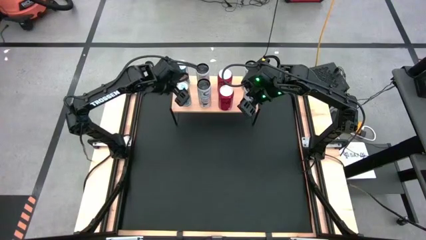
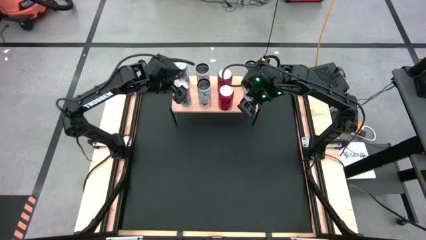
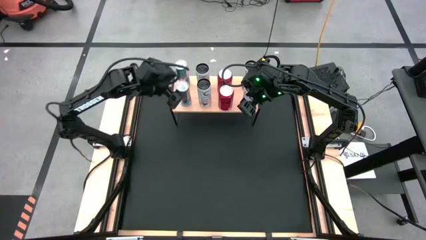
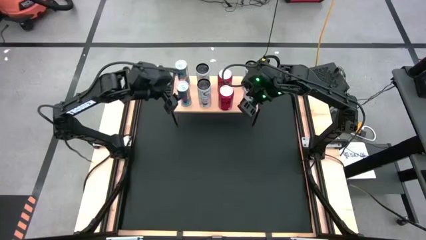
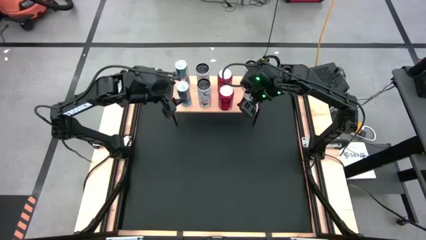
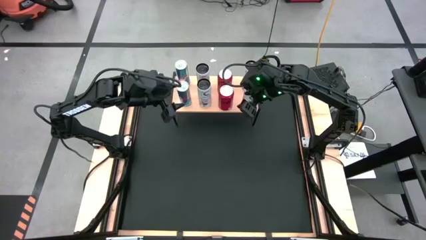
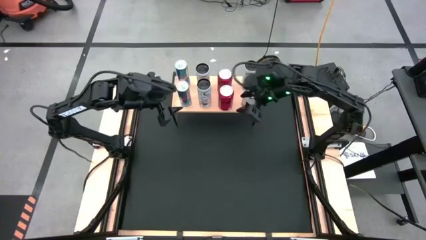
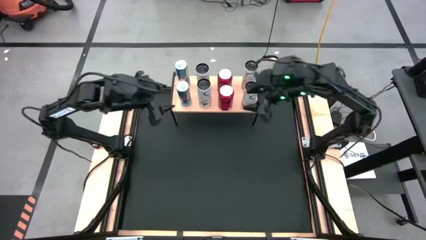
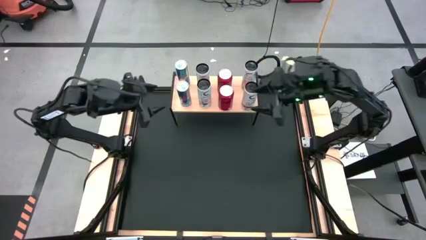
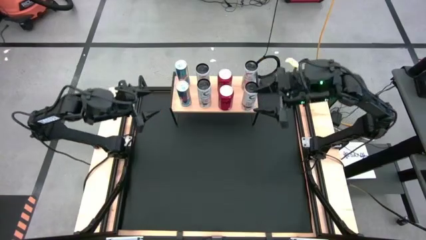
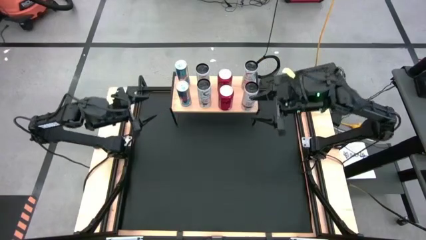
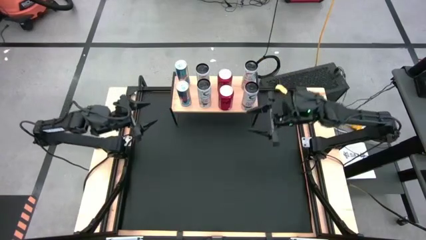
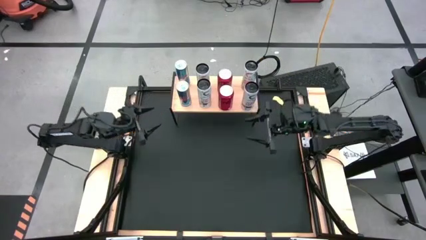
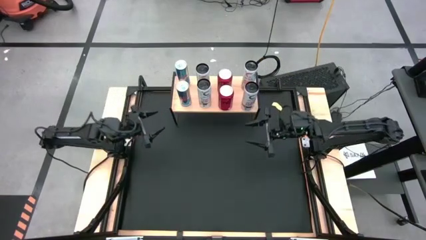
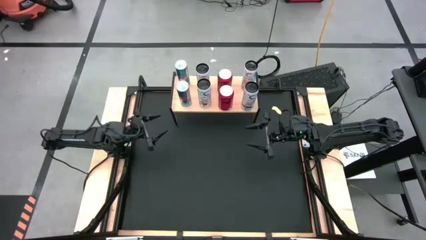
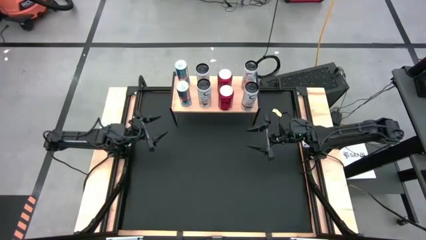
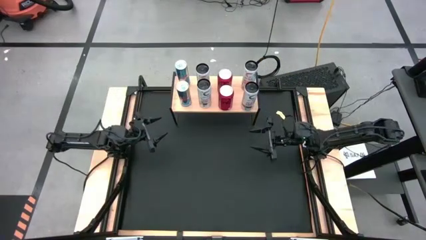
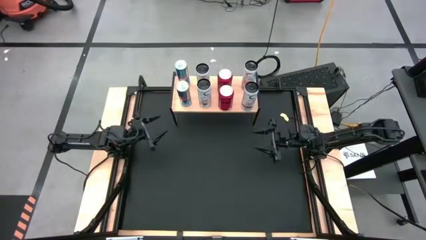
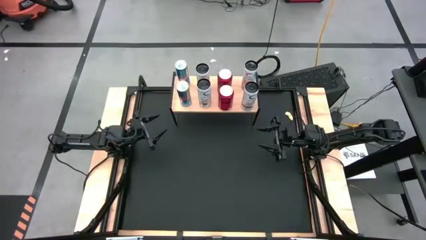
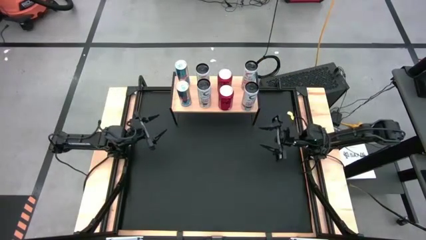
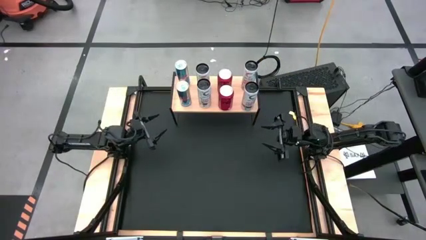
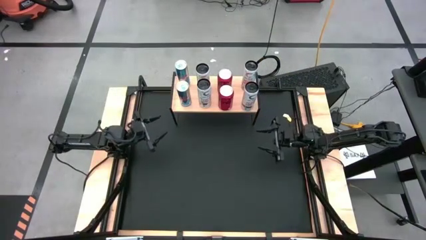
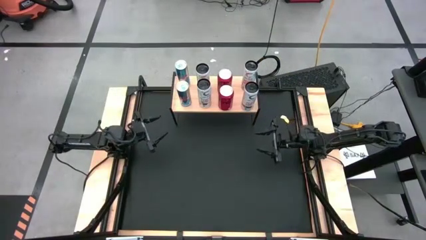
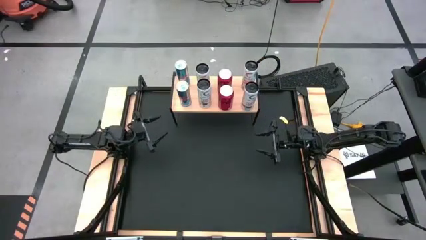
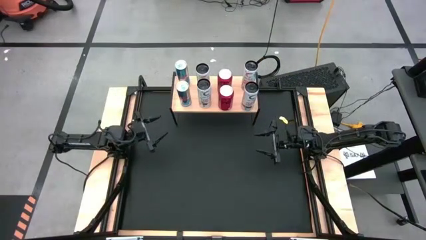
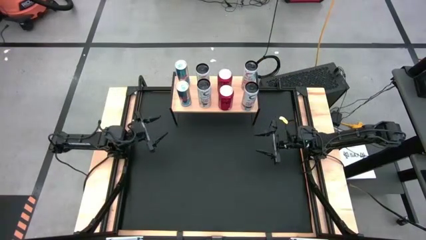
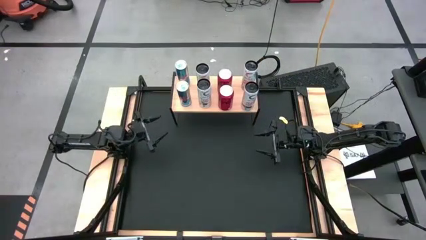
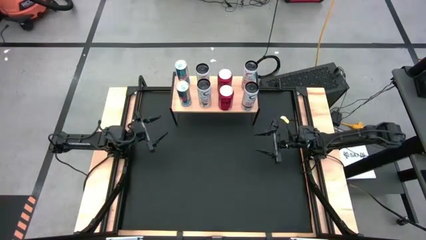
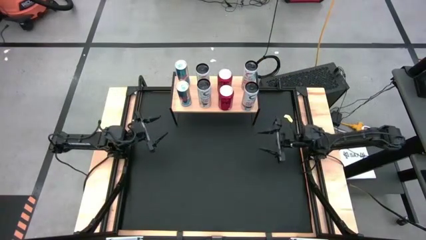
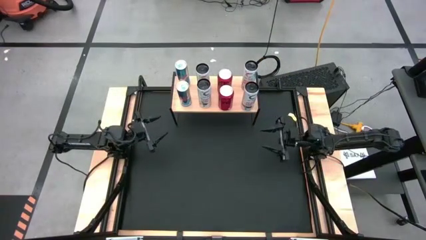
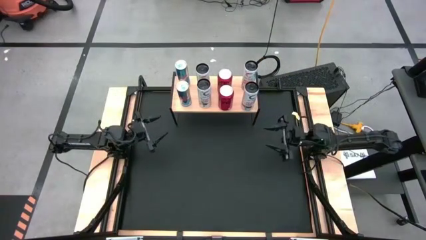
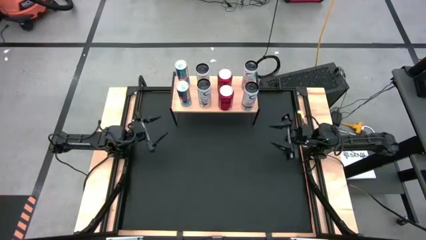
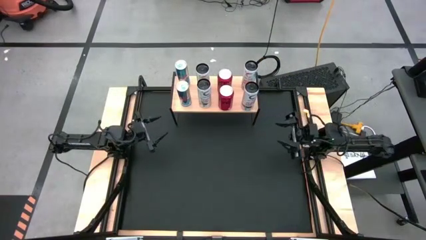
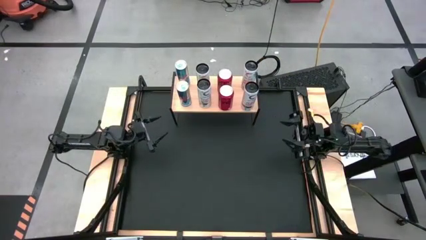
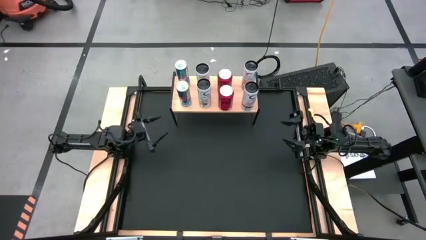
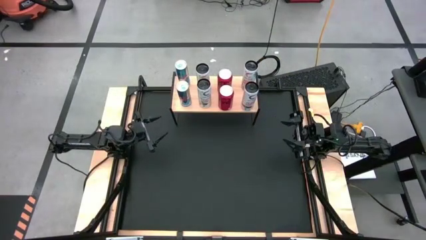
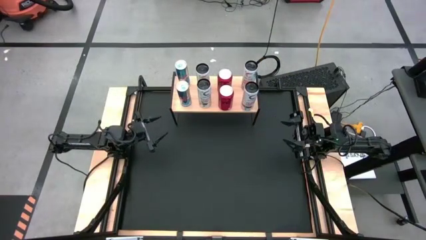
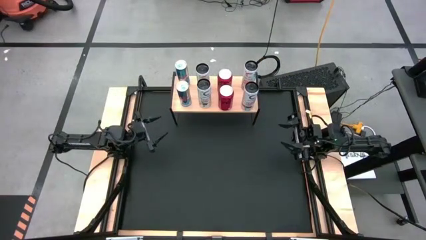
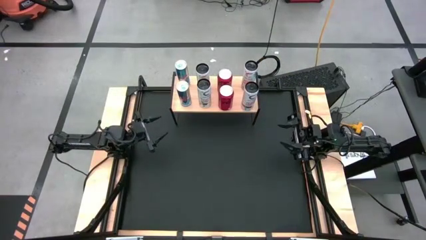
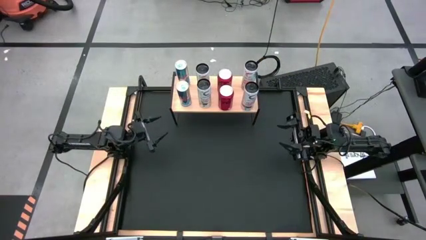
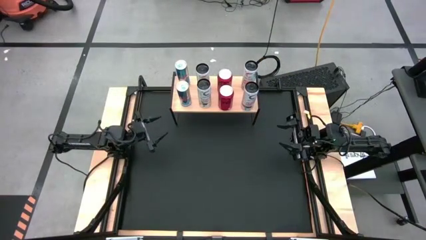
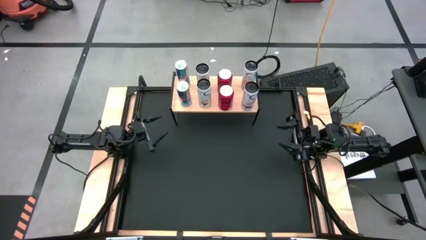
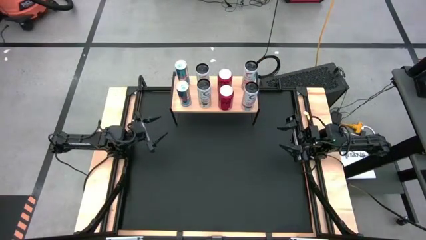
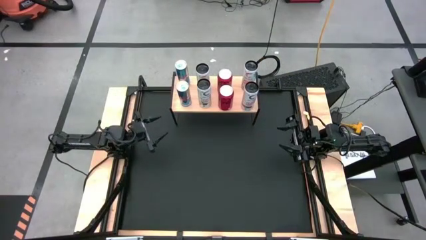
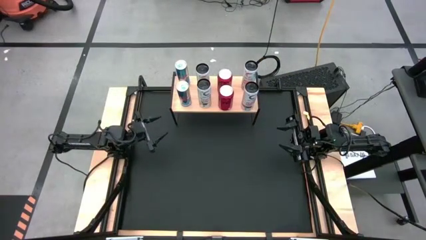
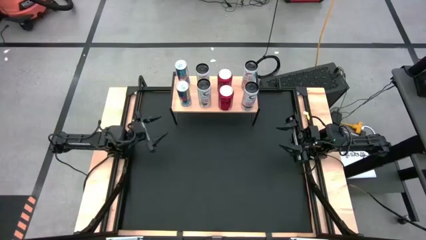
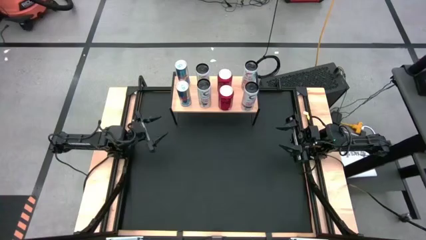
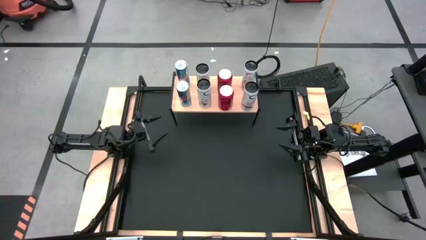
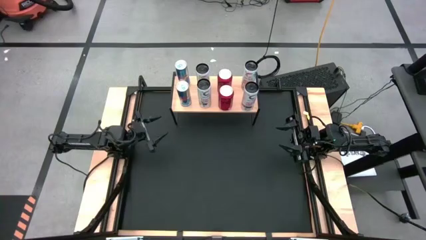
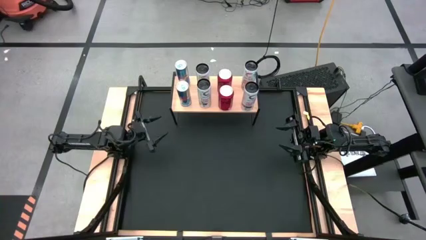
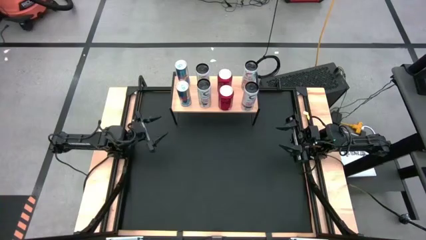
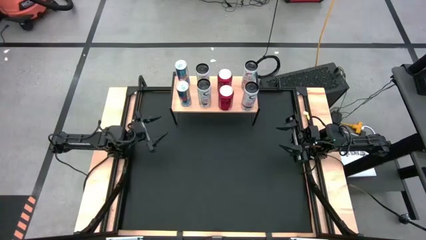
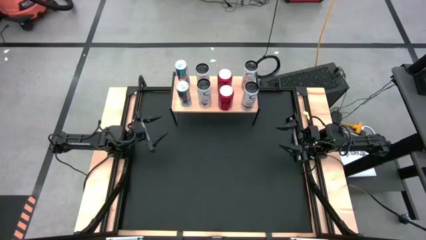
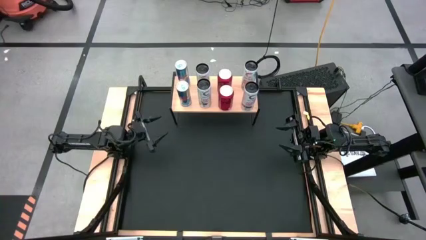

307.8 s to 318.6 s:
Task: Place canned beverage on shelf
Return to Home Position
